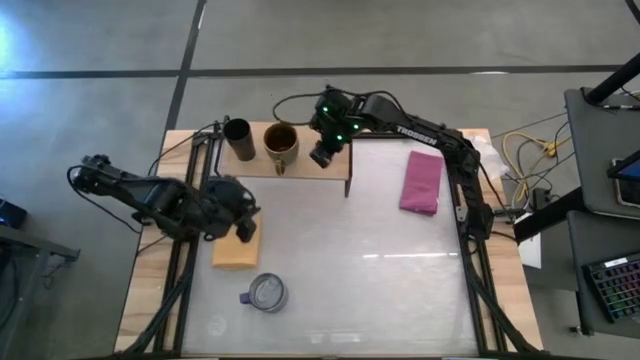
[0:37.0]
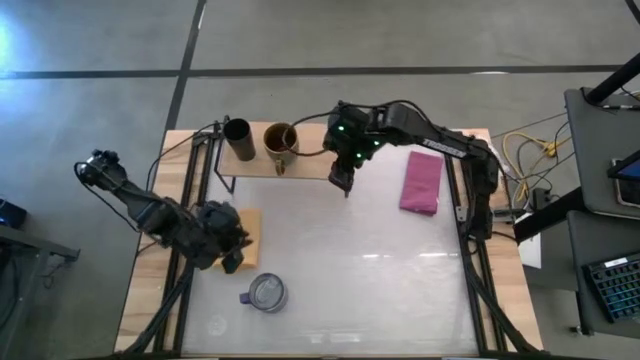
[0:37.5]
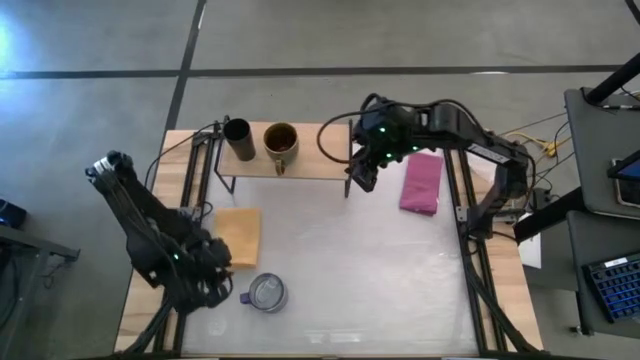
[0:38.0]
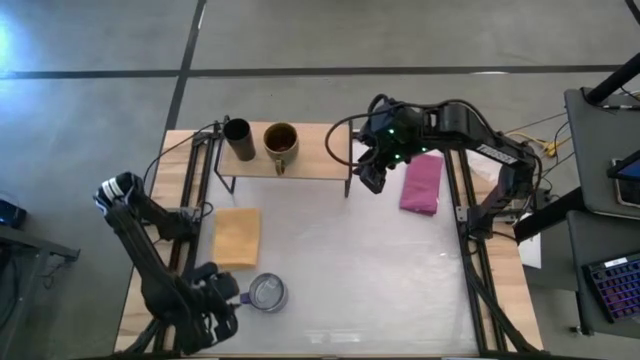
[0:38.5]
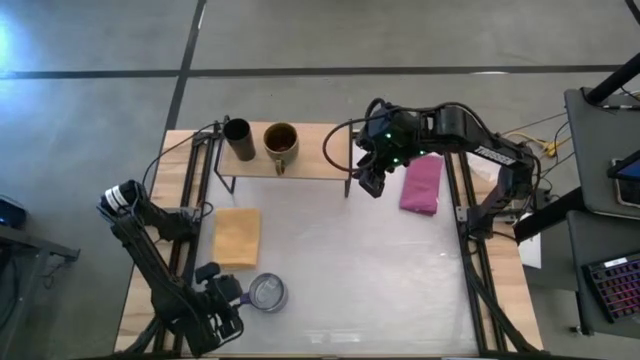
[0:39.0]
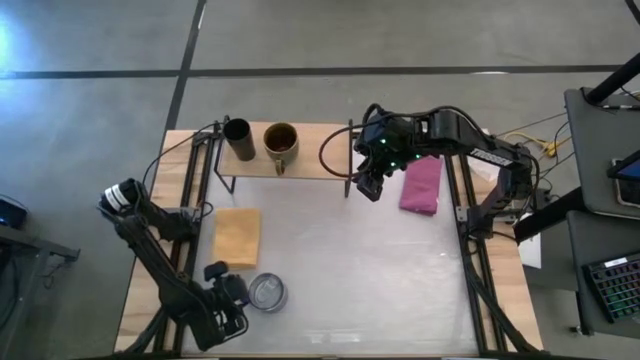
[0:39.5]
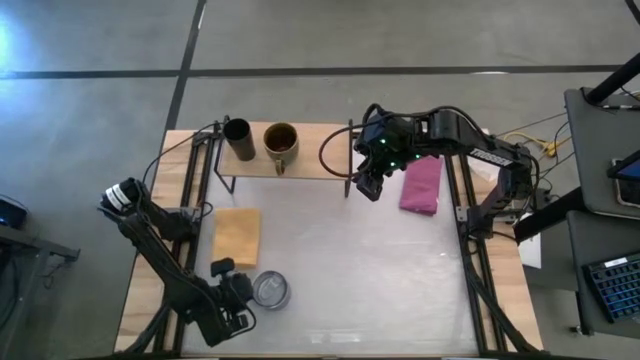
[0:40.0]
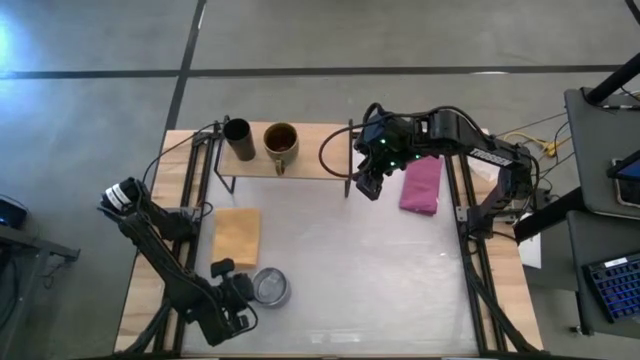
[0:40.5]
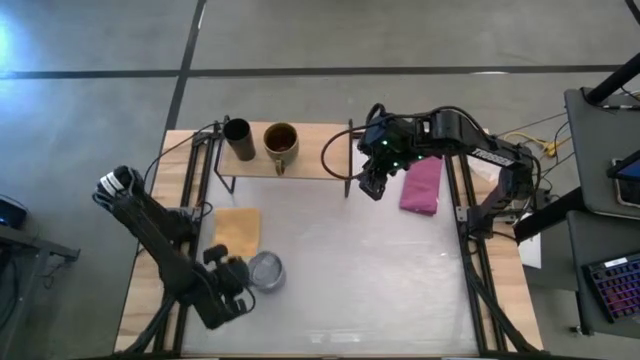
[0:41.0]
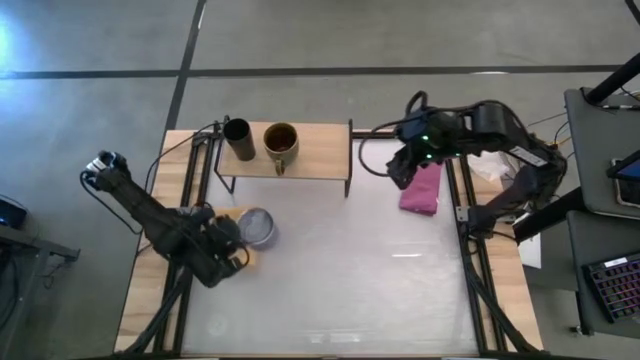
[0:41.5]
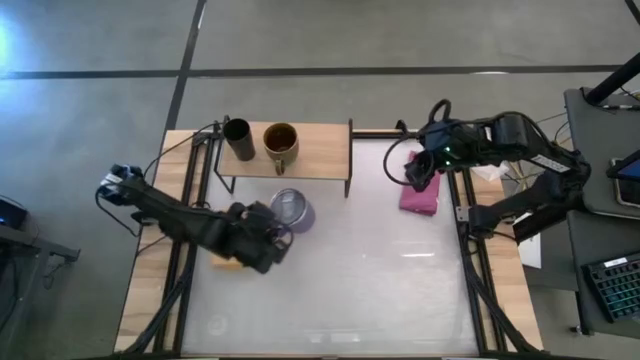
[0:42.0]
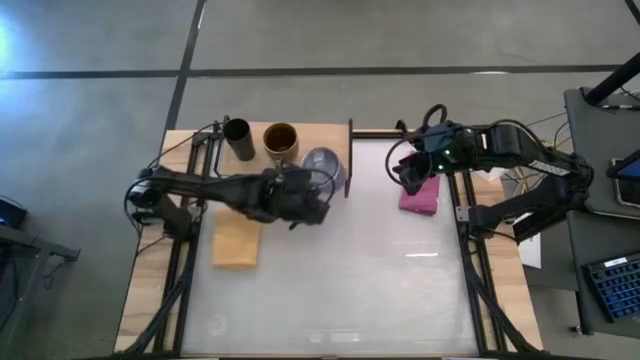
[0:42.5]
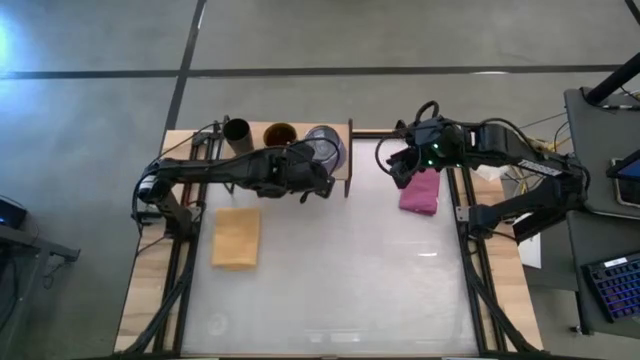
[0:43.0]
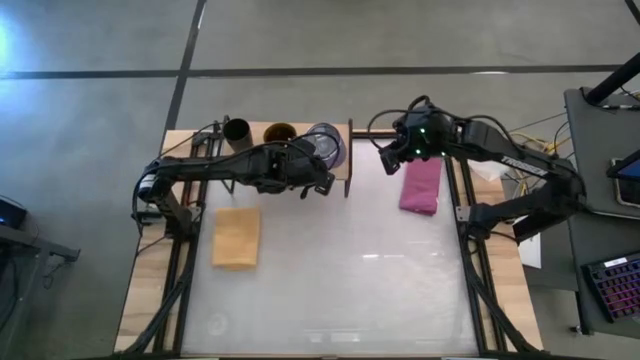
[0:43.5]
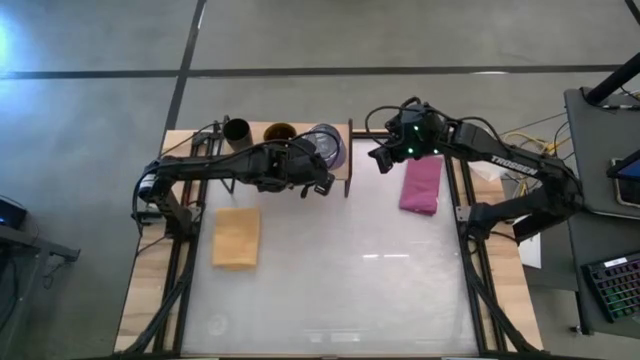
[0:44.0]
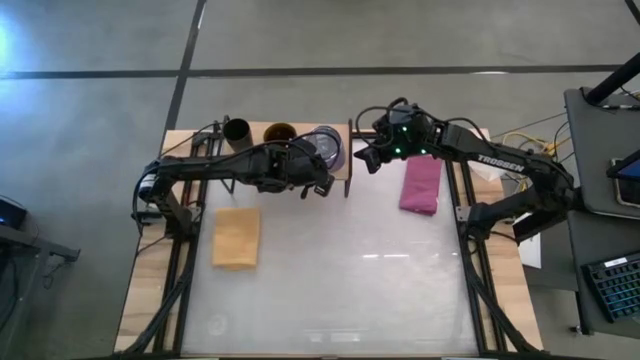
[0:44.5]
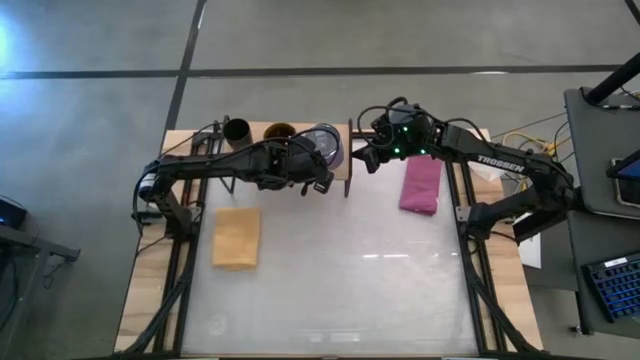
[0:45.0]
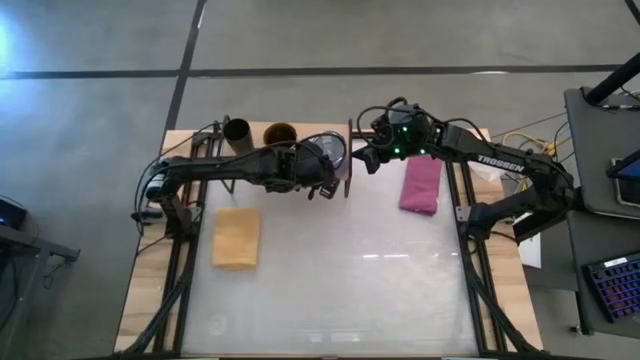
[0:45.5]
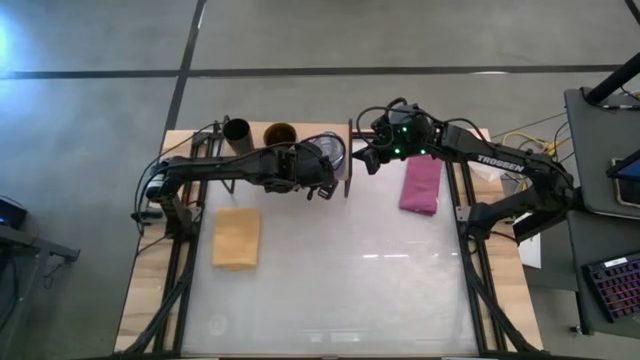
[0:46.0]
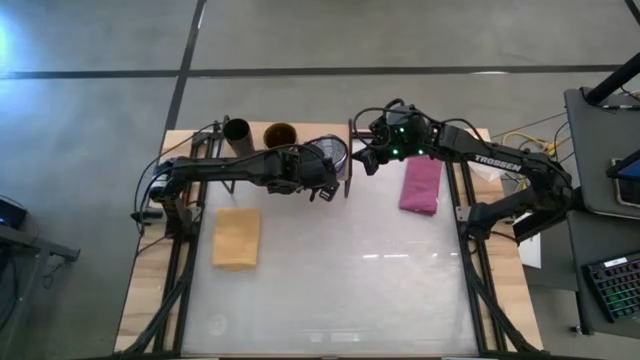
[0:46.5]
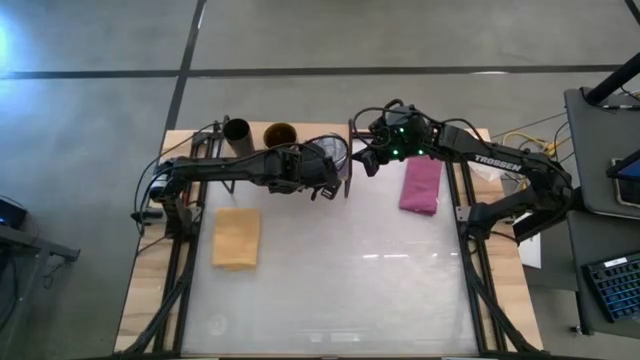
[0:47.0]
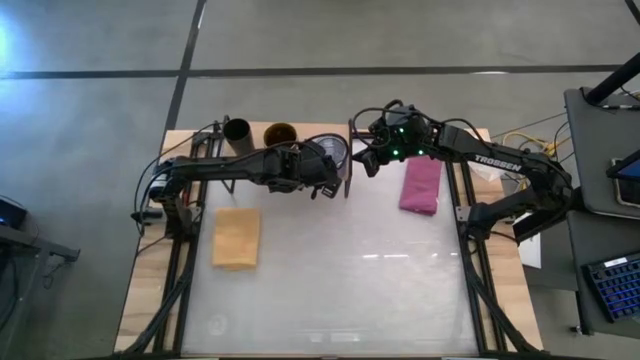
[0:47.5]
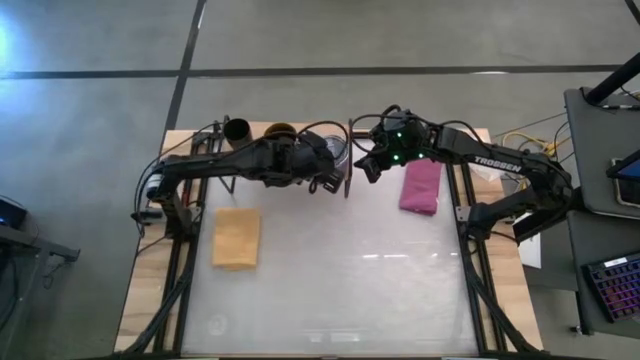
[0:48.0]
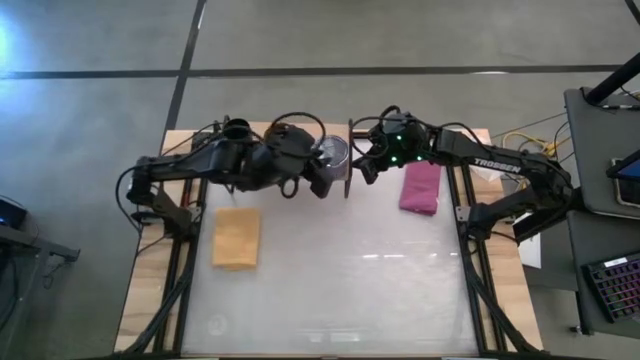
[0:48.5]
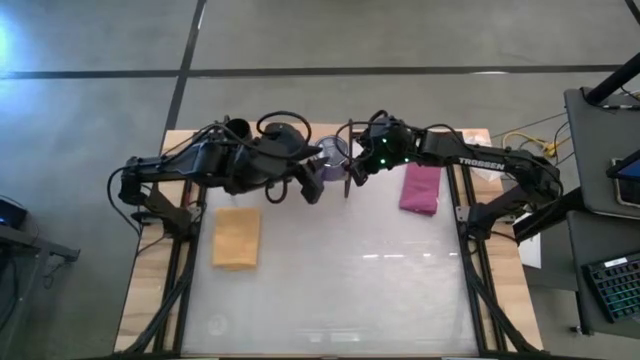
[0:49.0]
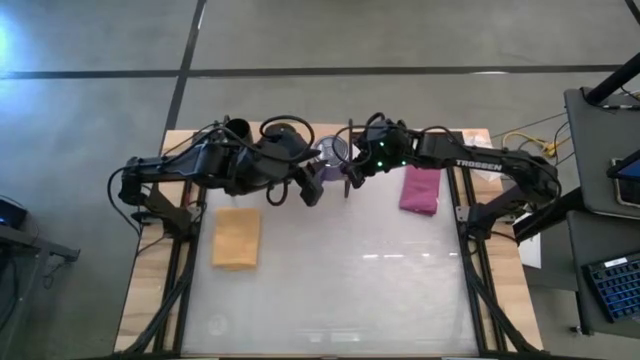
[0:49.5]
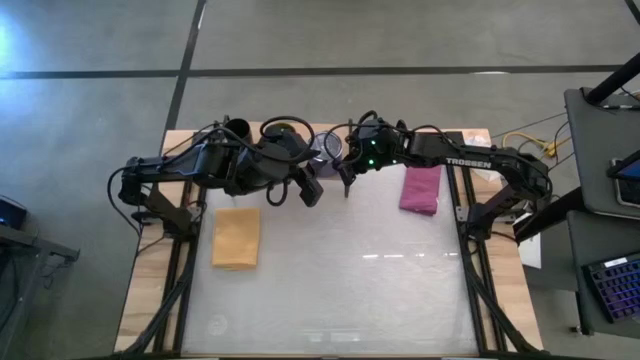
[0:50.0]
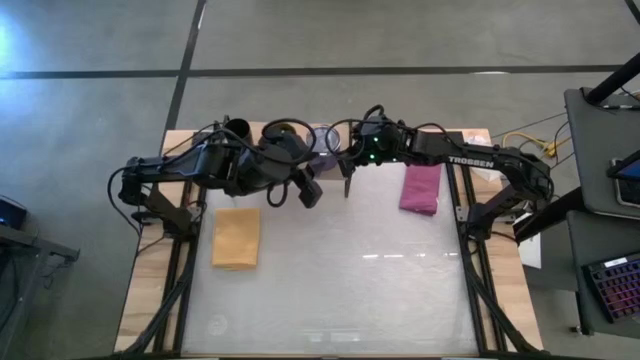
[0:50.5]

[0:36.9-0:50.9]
Task: Stack small to large cups/mugs on shelf
Put the purple mug on the shelf

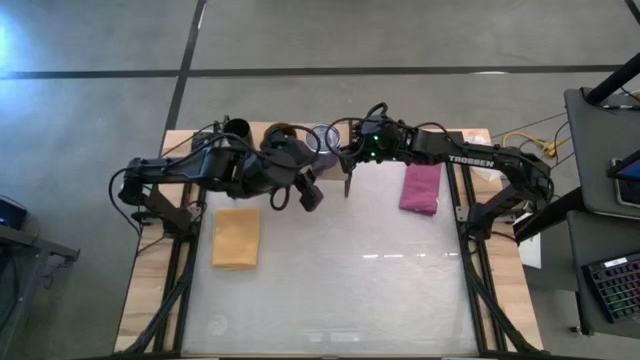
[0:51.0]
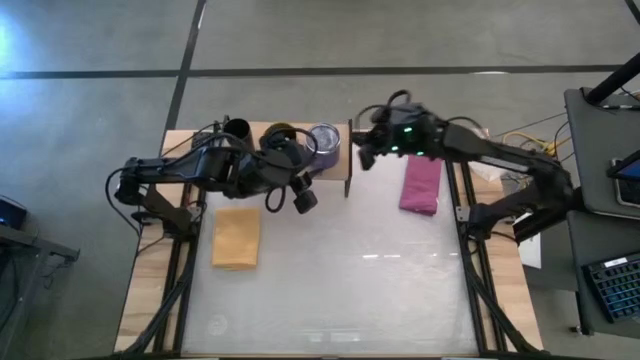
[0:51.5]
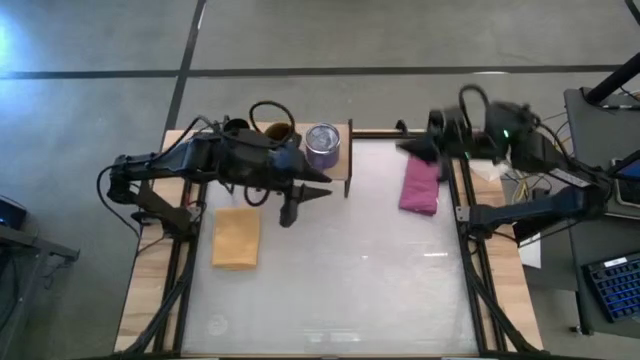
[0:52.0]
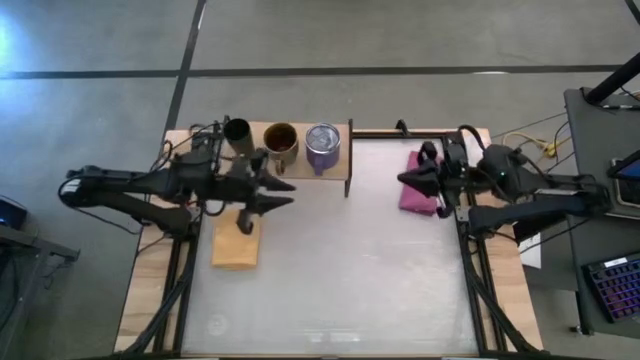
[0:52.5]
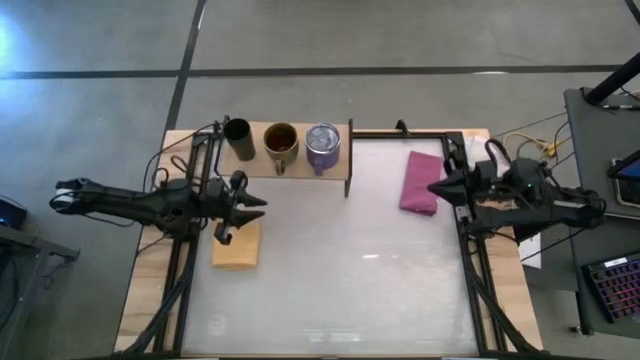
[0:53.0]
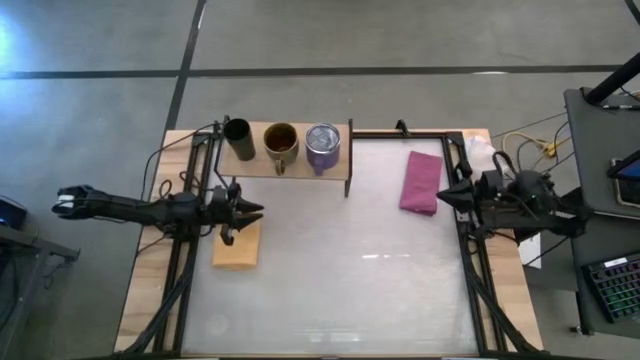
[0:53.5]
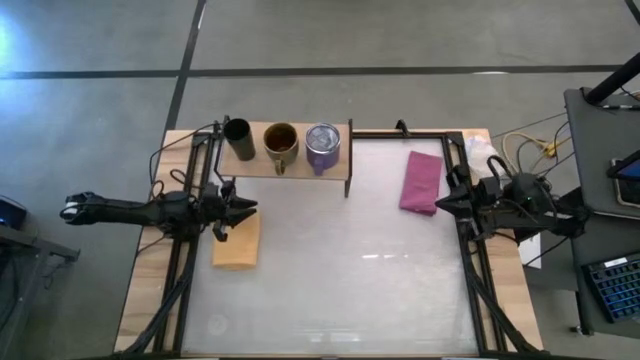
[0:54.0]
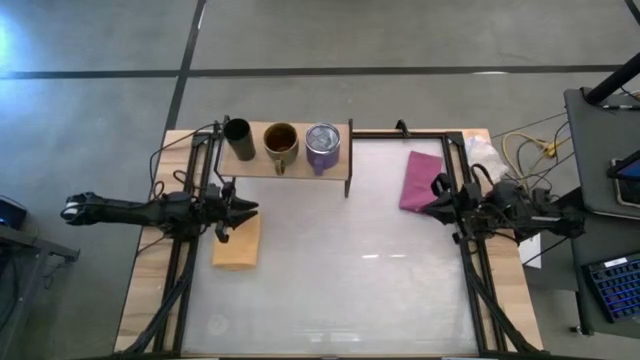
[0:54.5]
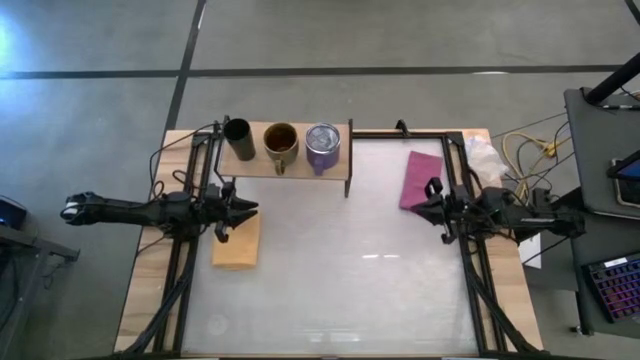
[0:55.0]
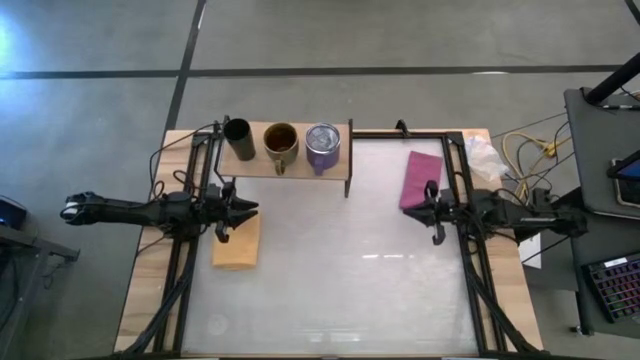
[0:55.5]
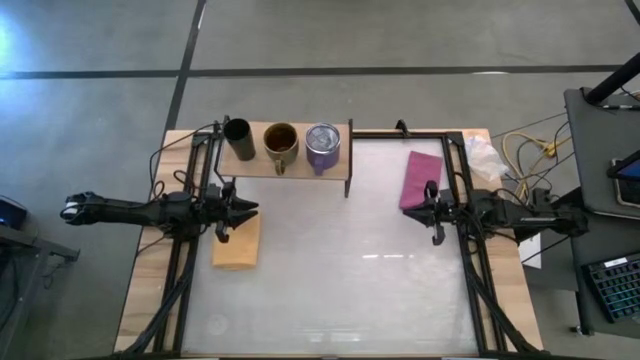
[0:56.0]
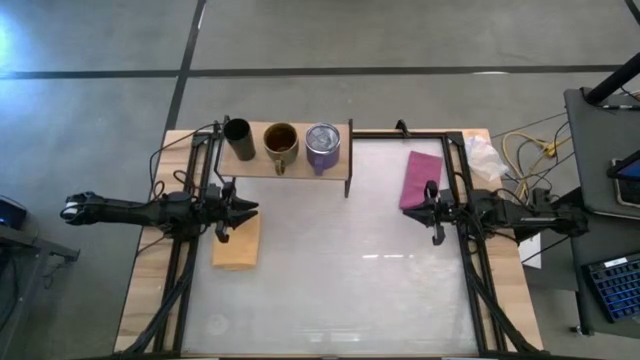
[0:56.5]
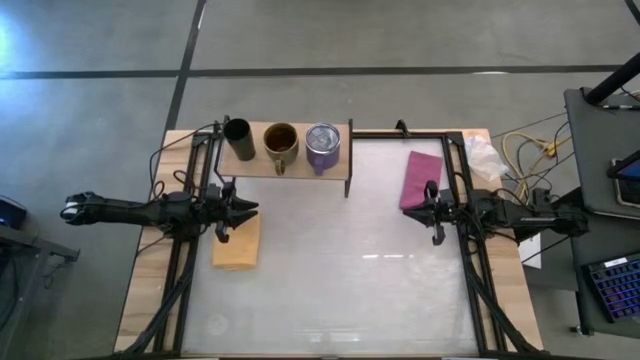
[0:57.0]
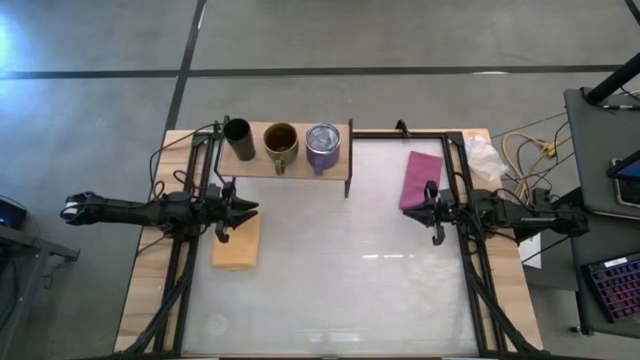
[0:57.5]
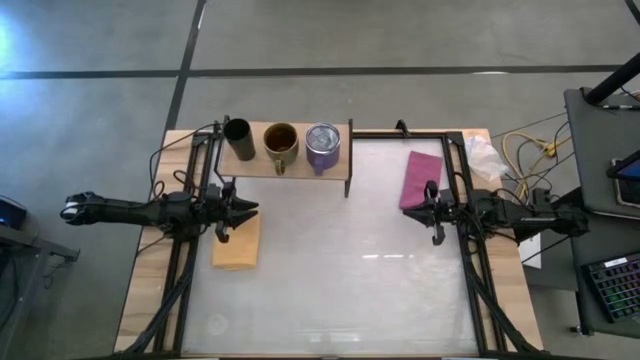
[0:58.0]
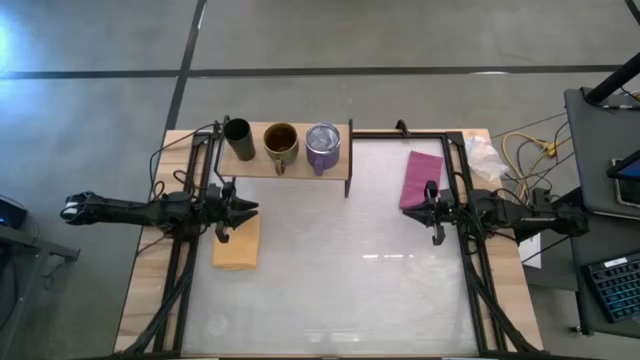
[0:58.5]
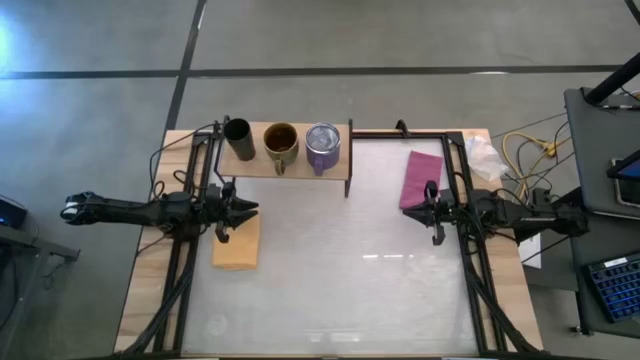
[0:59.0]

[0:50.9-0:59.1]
Return to Home Position
